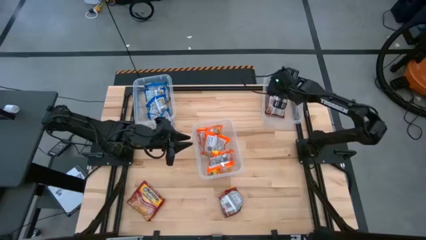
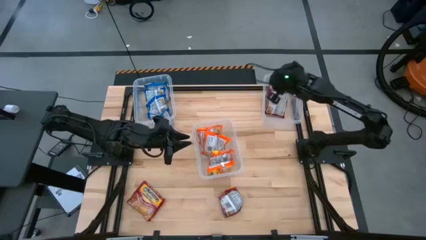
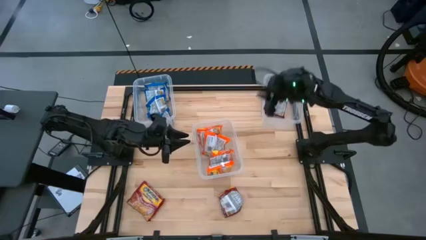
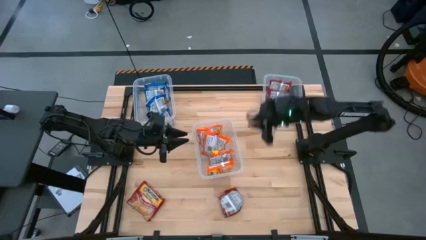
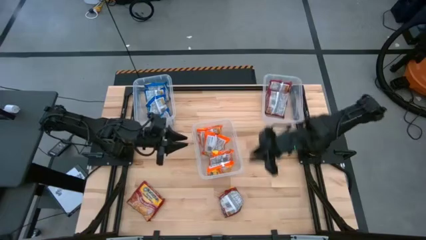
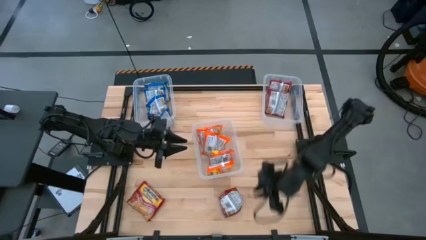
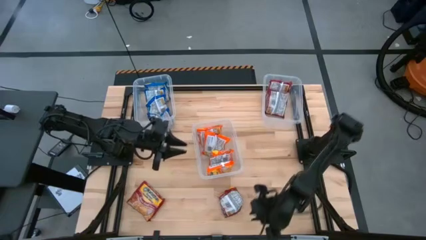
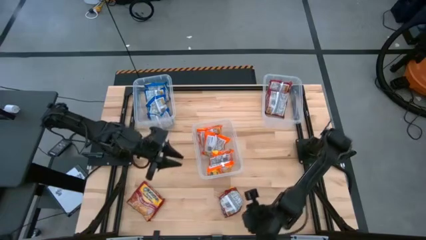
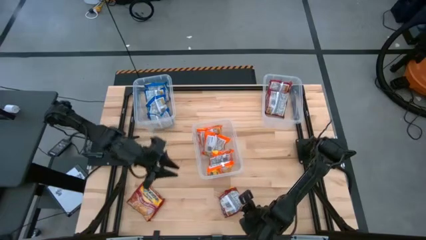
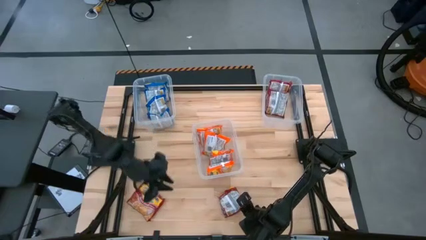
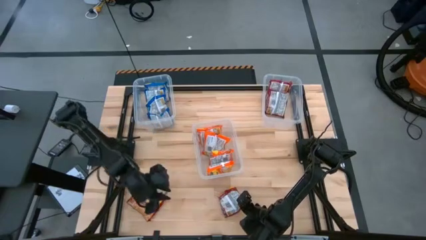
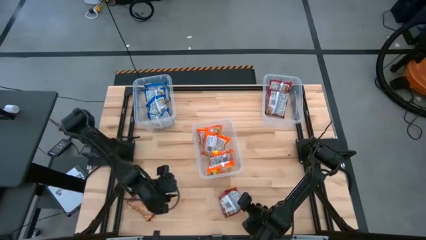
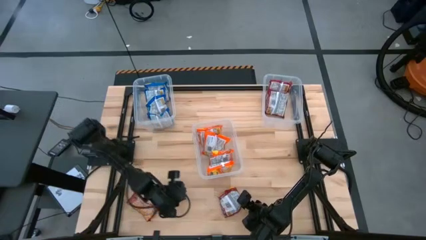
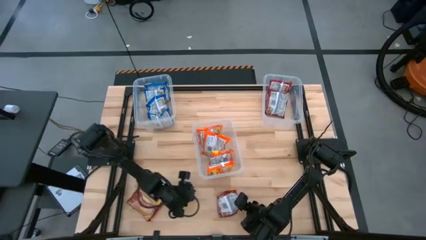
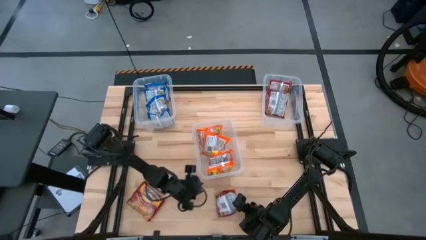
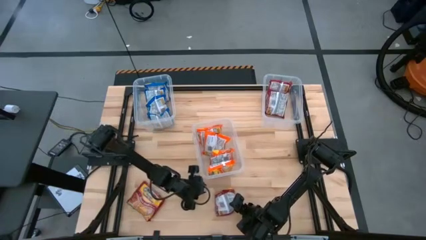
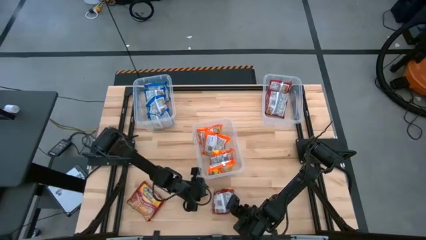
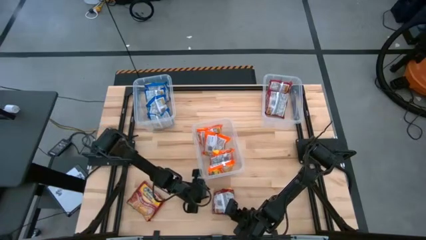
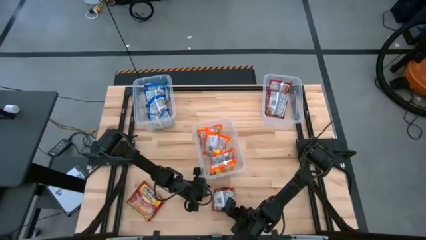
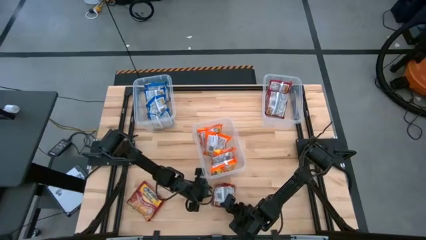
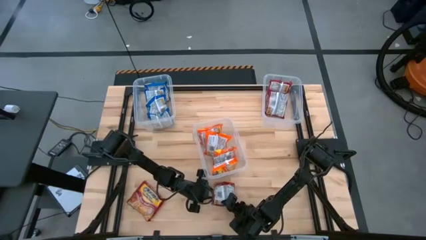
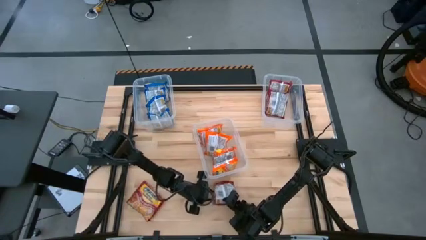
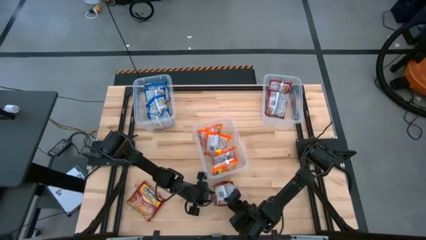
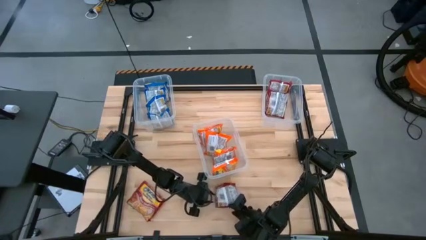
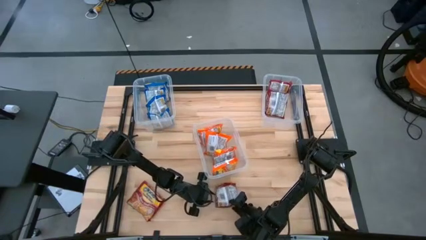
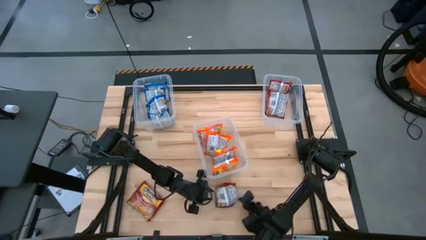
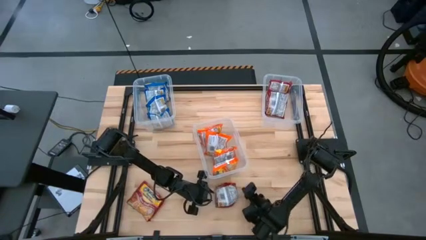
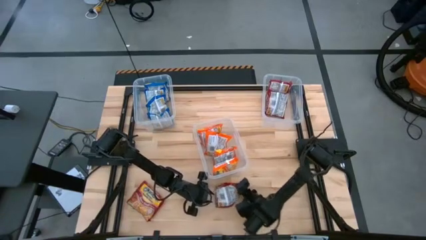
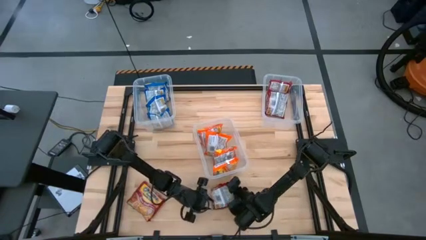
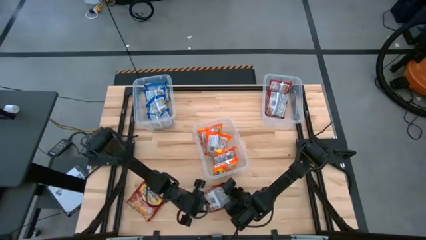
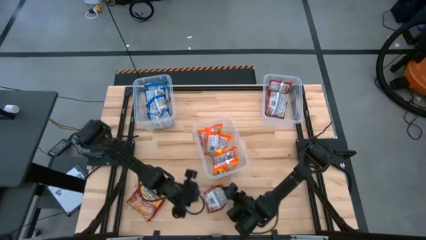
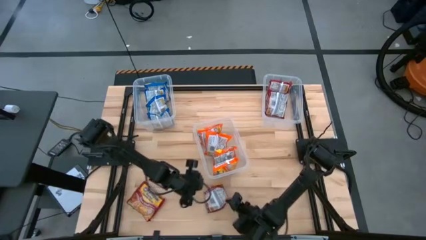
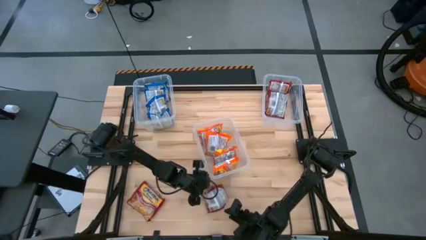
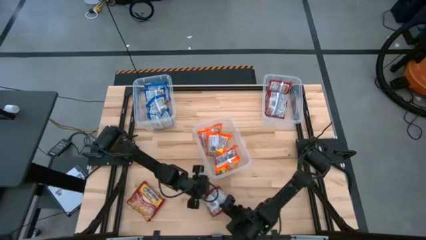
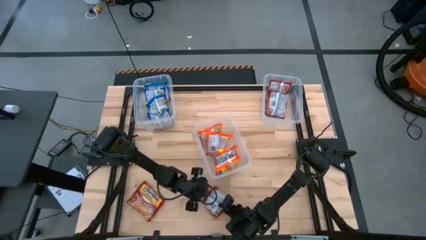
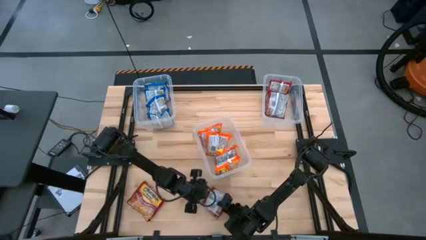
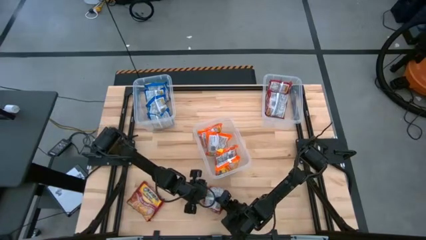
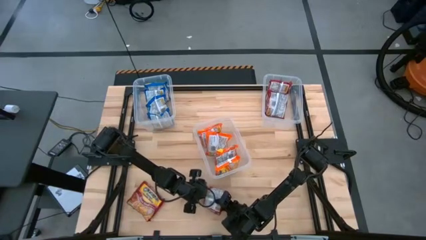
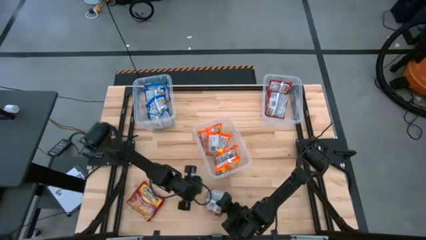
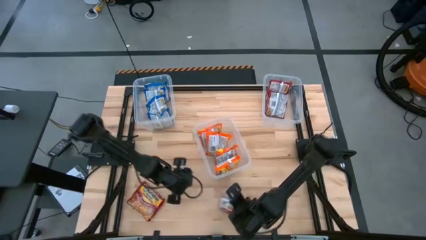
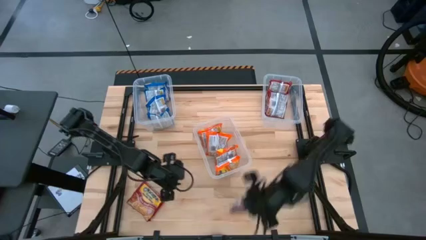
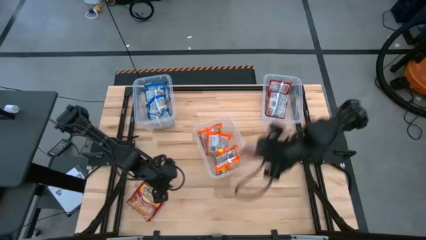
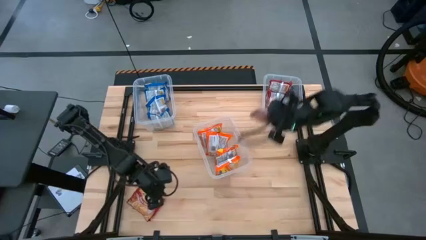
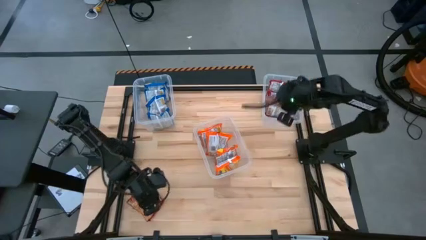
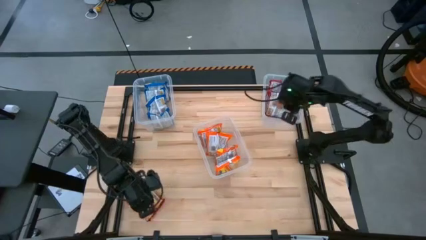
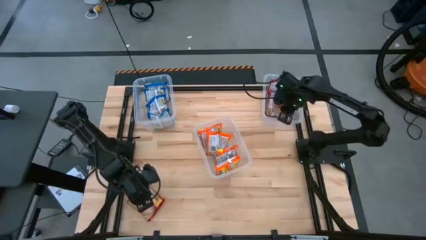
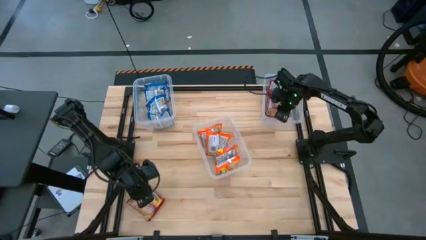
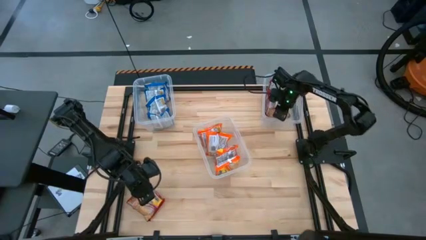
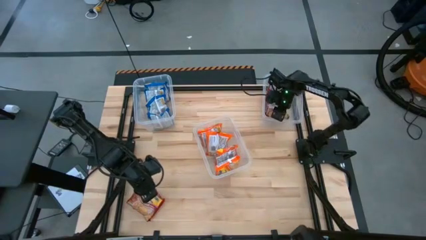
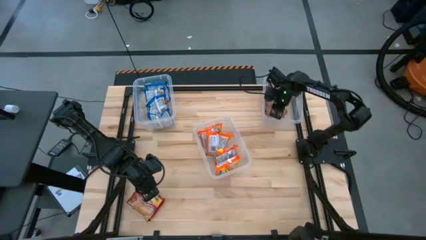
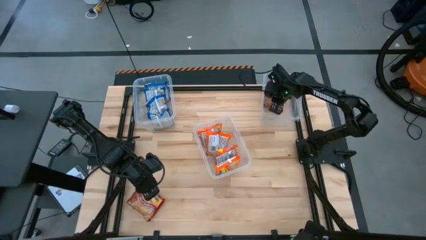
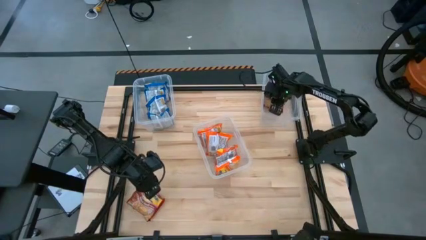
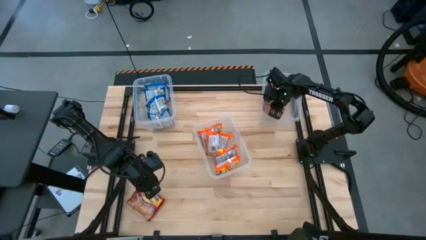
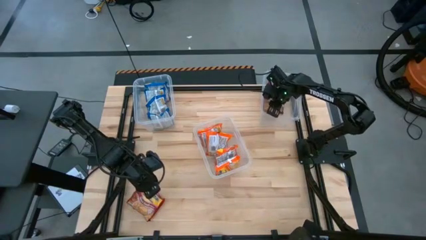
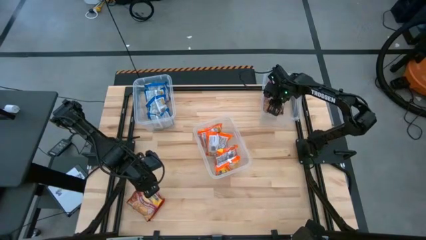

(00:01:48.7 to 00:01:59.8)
Task: Sort Maruchan noodles
Put the red noodle pack into the right transparent bin

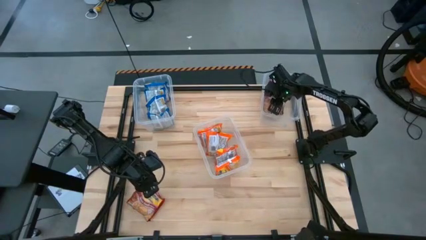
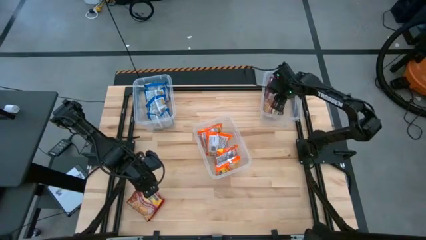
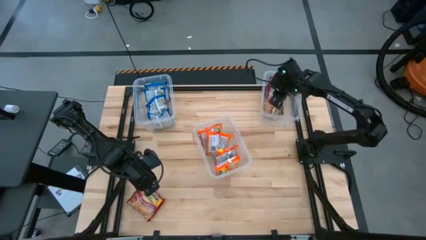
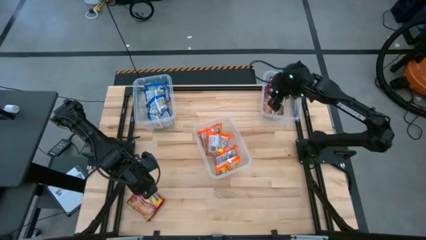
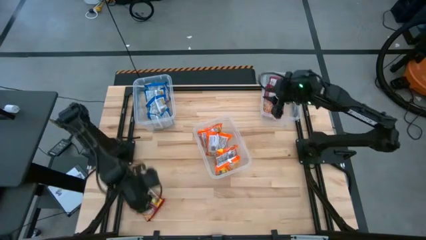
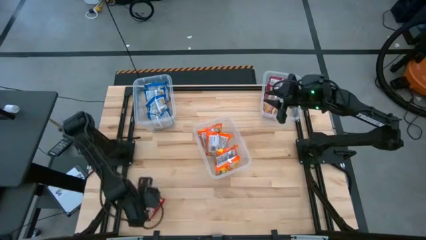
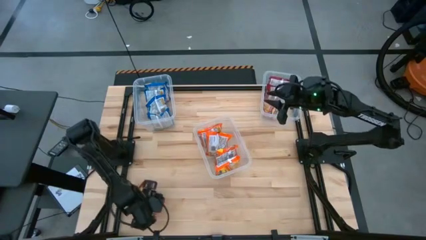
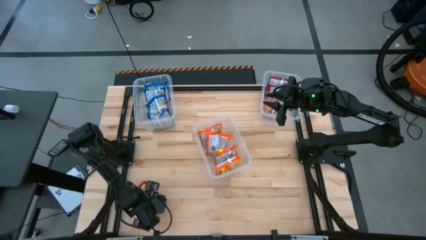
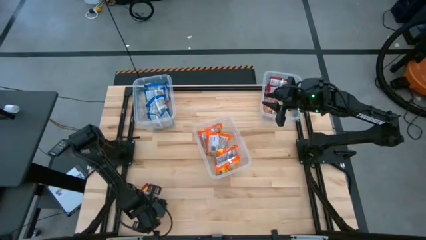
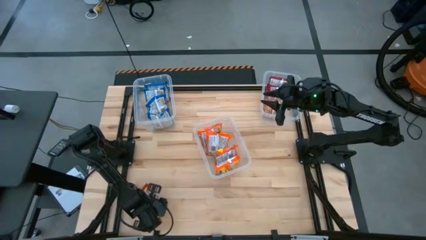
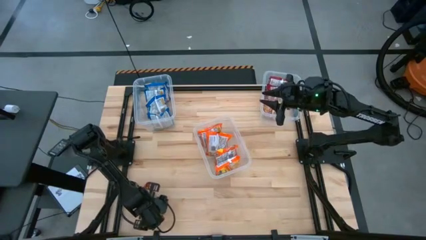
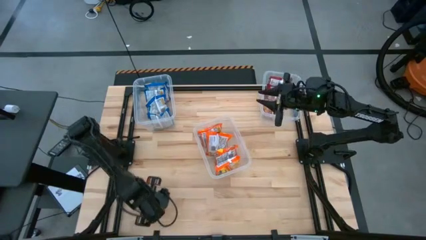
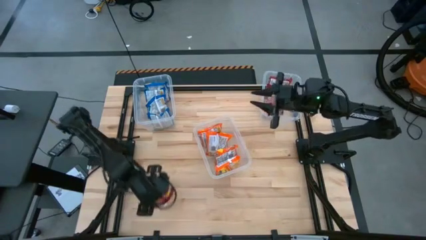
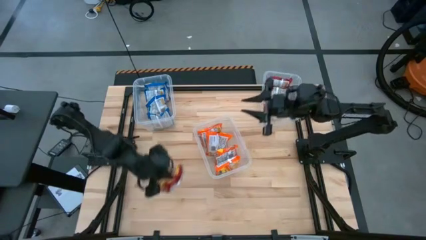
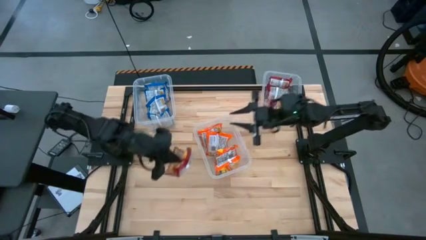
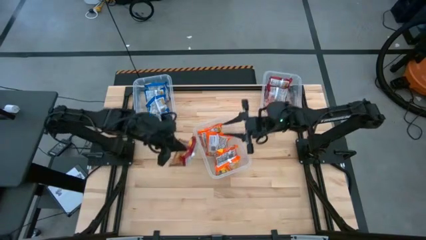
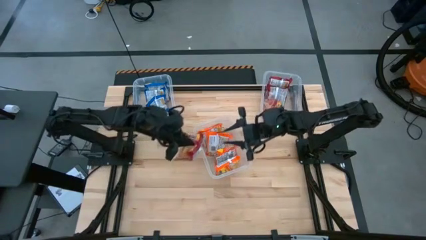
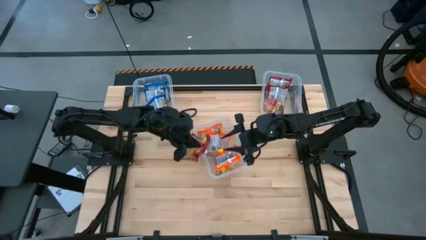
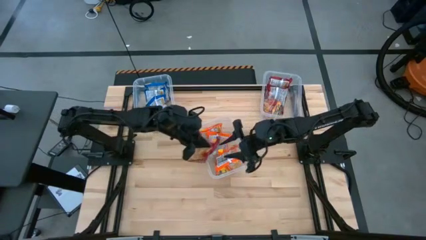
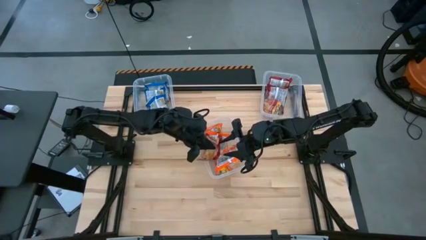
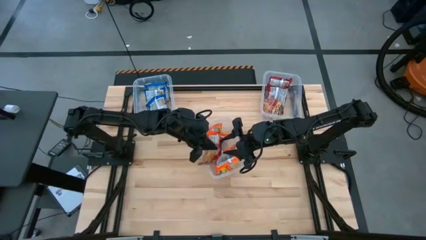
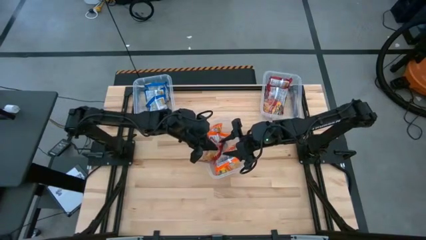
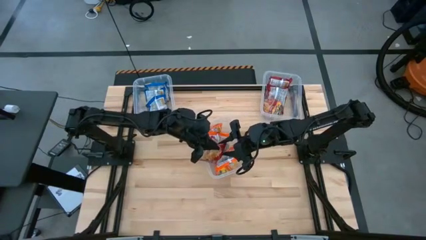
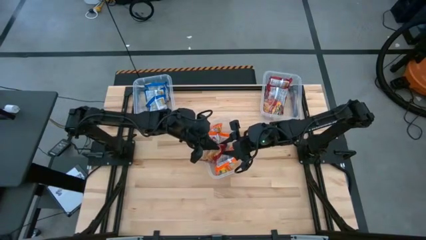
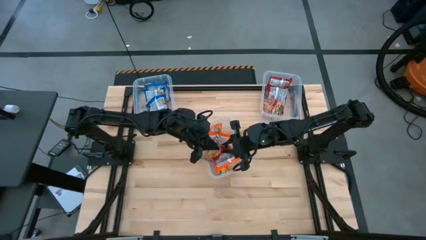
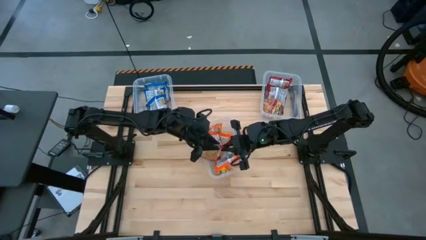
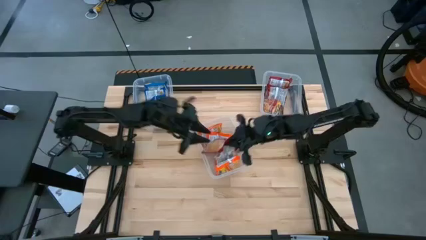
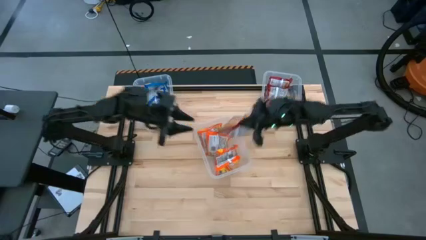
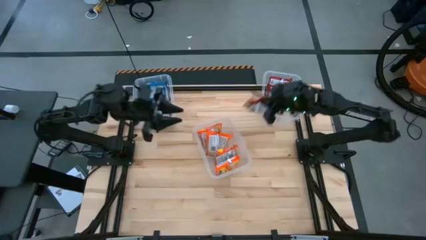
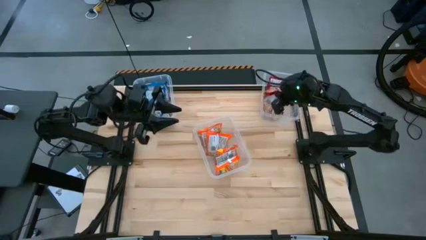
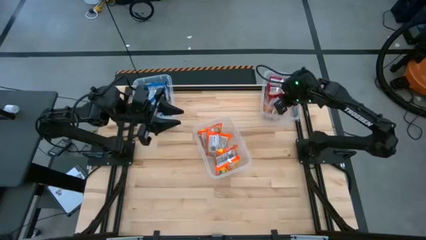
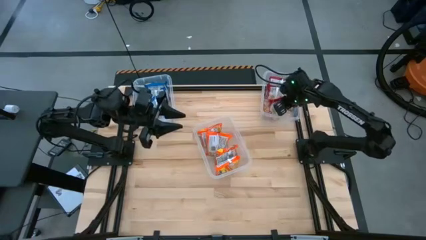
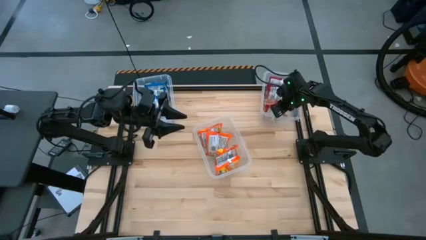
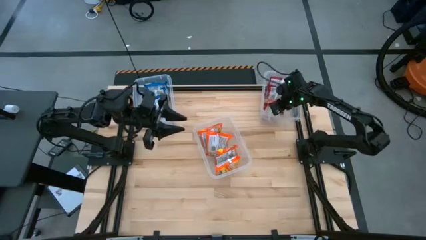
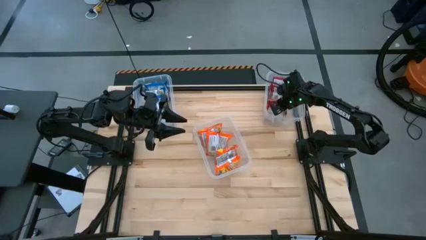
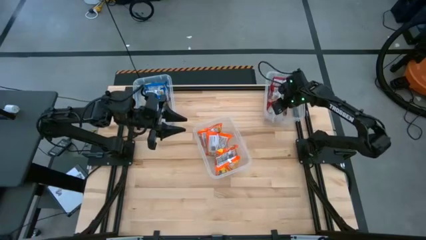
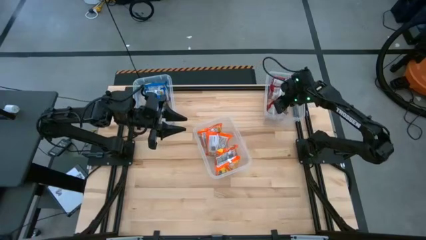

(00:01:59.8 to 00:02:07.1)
Put the red noodle pack into the right transparent bin
